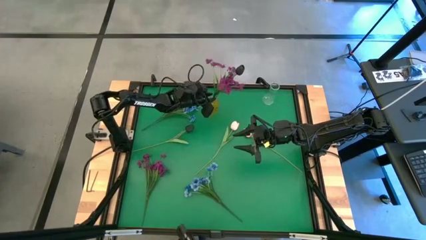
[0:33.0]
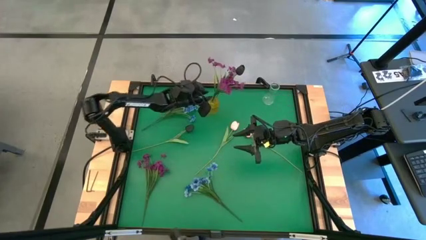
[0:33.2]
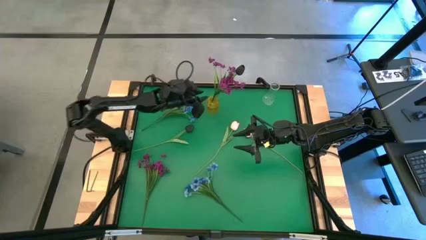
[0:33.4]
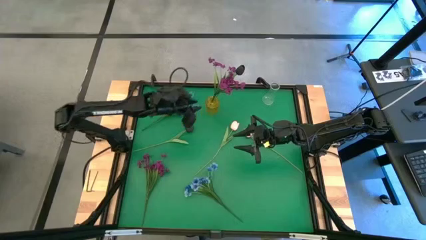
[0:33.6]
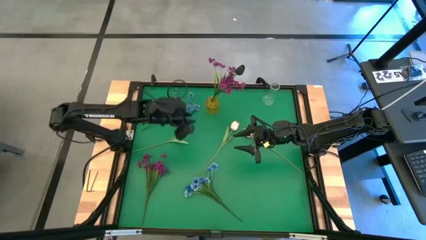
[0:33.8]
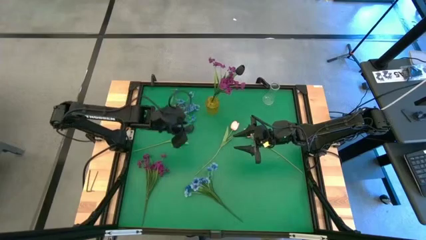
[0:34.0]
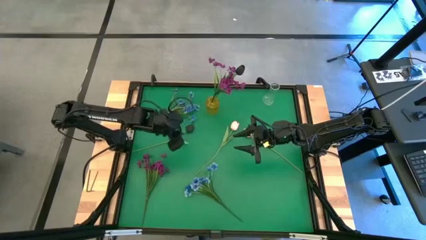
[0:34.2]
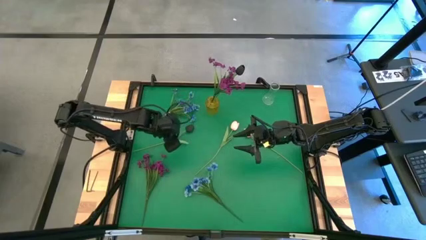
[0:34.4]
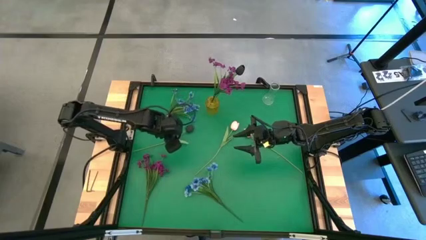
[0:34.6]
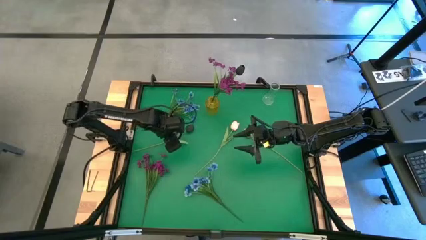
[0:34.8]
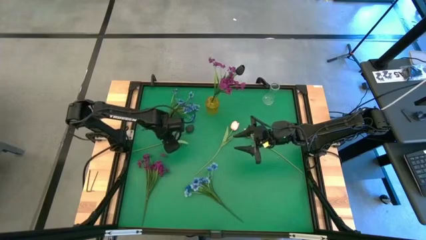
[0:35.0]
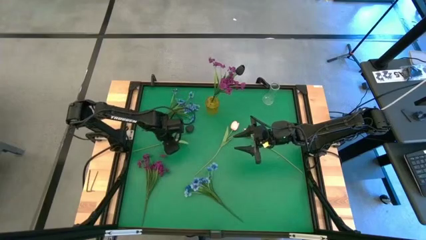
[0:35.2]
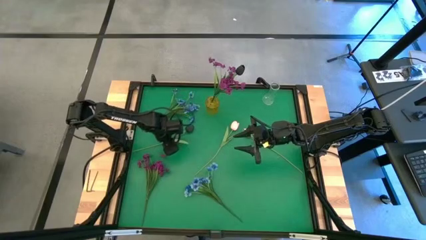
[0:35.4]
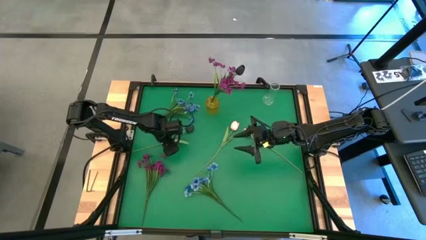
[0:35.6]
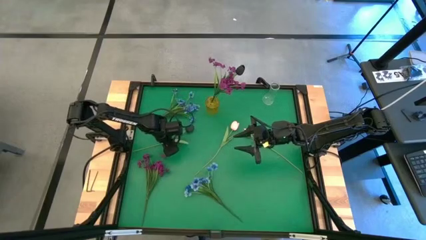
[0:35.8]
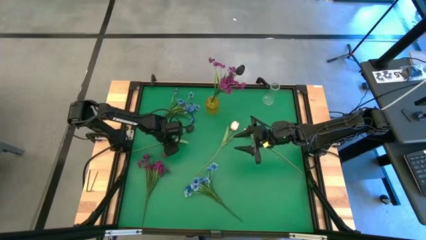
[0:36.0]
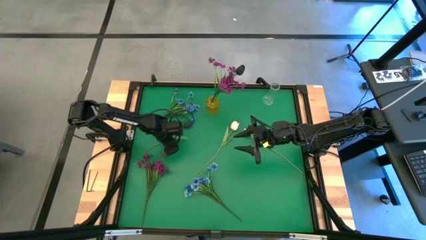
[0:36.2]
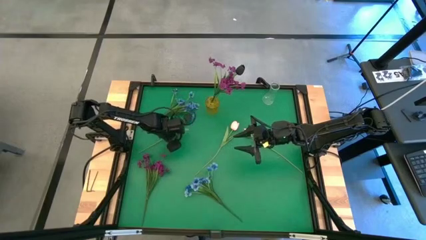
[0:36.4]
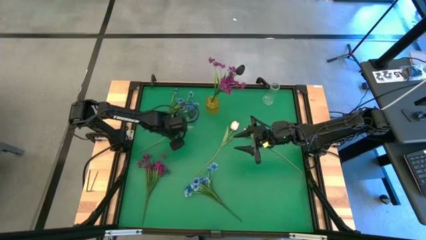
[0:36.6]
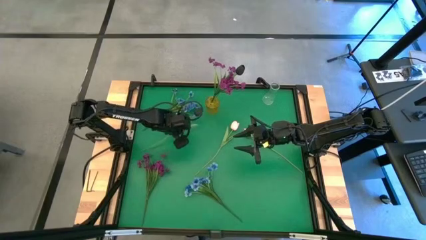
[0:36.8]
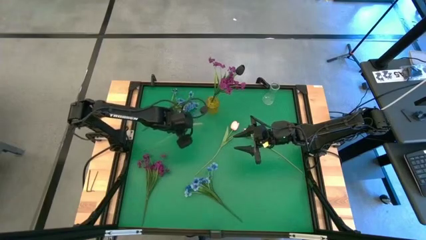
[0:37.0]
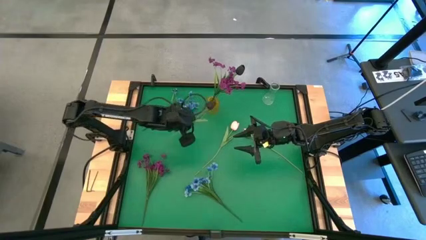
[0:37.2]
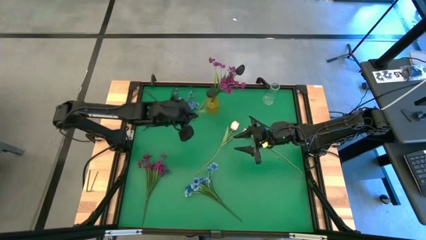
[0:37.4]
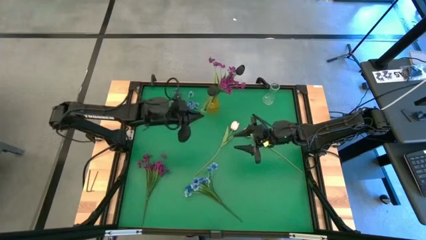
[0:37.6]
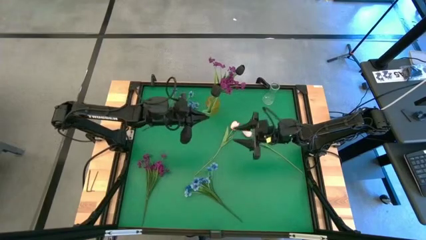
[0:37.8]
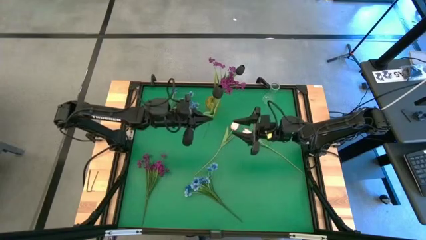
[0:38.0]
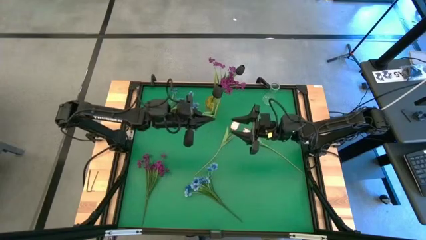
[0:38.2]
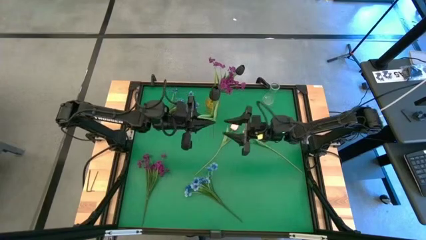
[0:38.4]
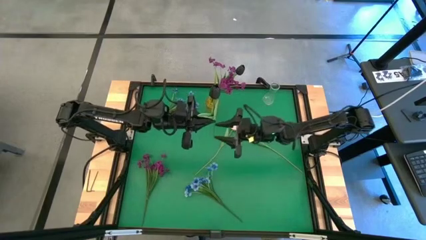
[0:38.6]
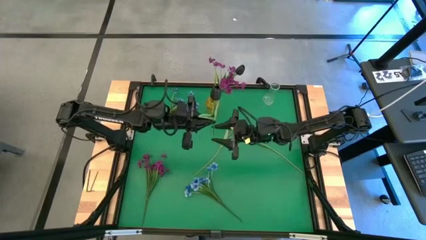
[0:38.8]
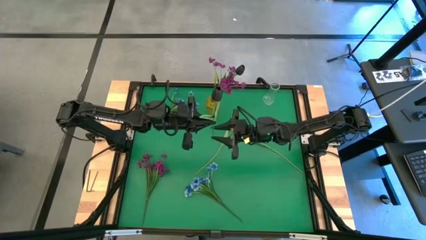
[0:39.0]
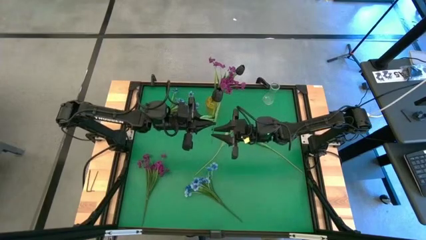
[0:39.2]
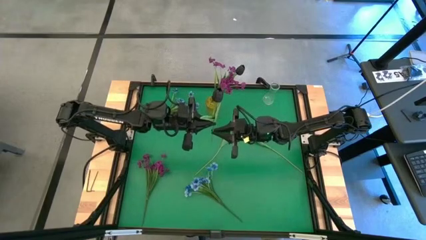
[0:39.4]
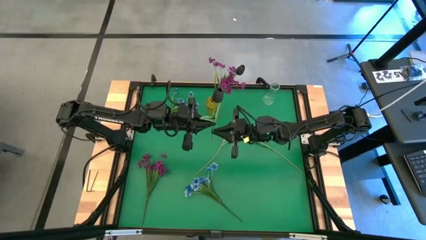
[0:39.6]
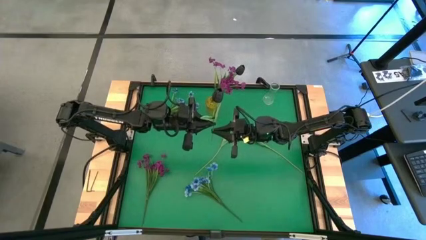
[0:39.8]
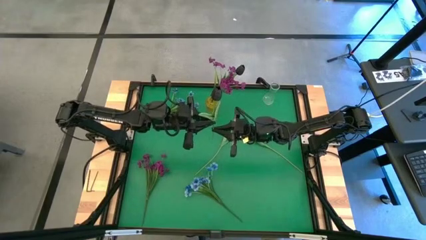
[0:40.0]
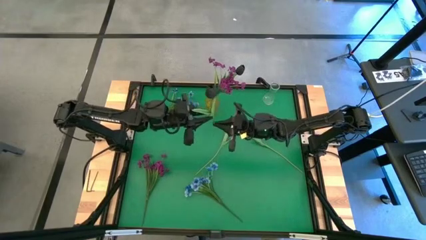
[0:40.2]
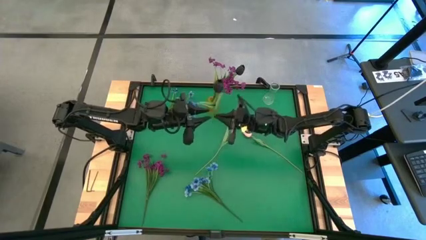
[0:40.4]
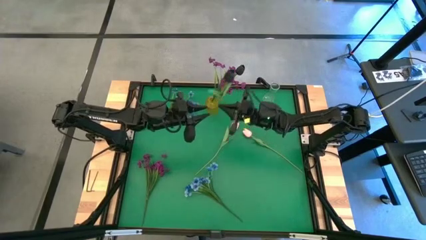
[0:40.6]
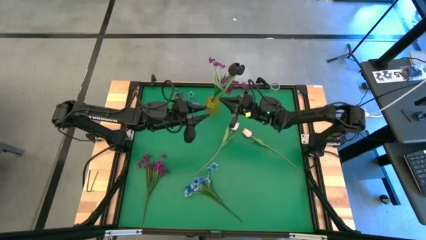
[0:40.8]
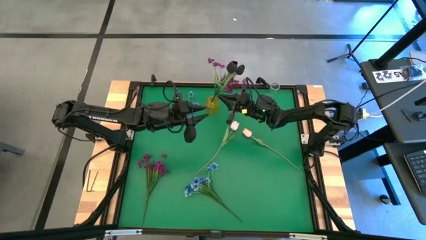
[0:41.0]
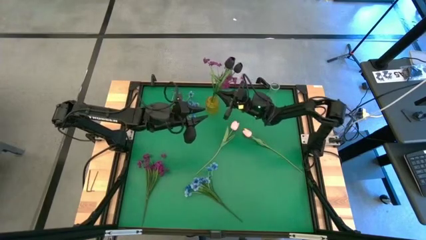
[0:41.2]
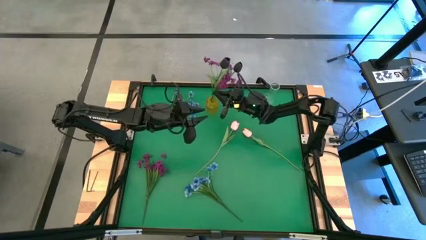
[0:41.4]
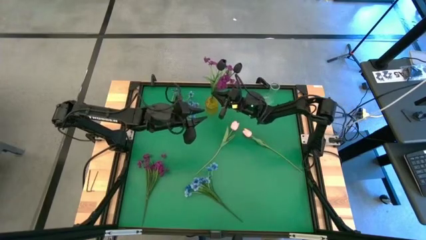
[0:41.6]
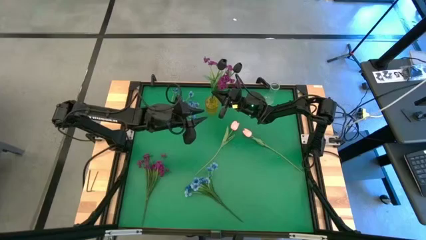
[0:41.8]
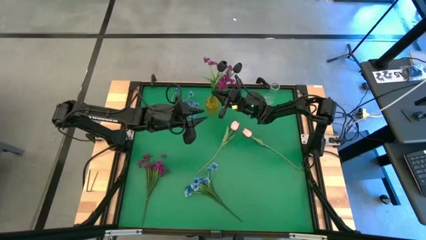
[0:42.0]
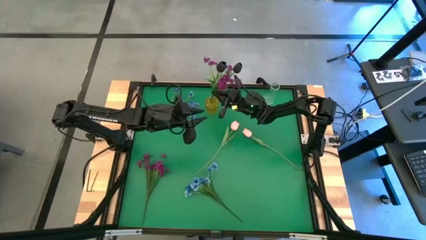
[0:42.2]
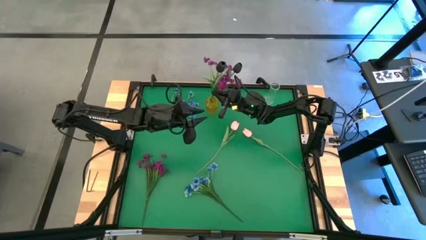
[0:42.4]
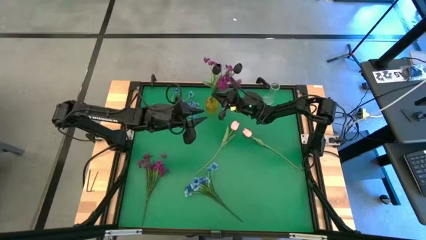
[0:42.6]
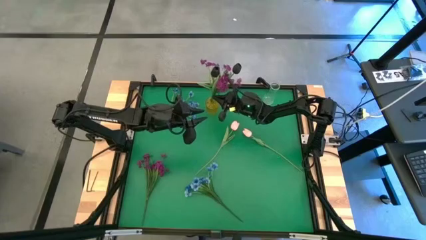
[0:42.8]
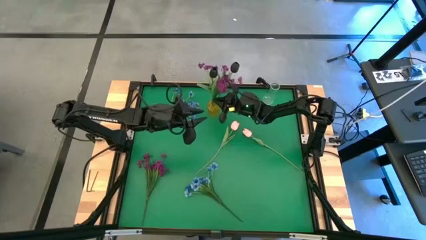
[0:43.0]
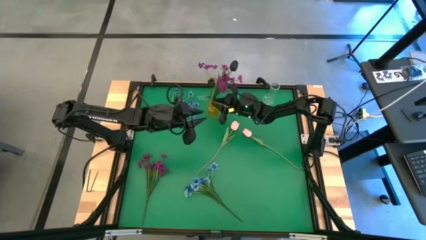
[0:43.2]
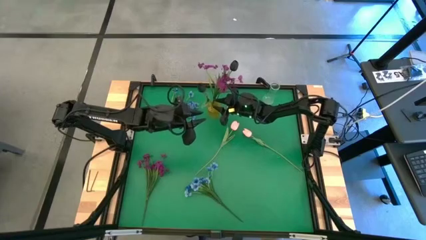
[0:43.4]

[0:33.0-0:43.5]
Task: Sort flowers into vase by color
Put the black flower into the yellow vase

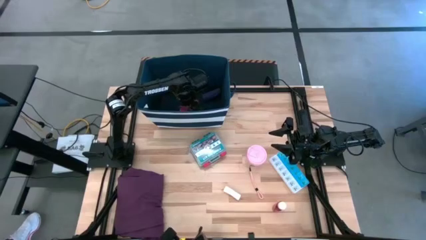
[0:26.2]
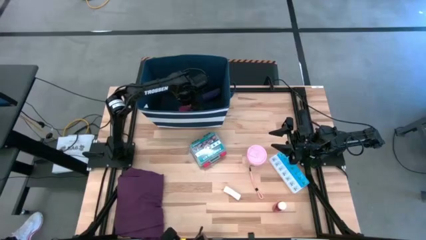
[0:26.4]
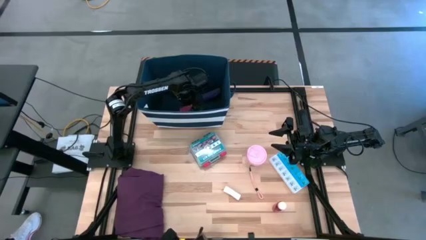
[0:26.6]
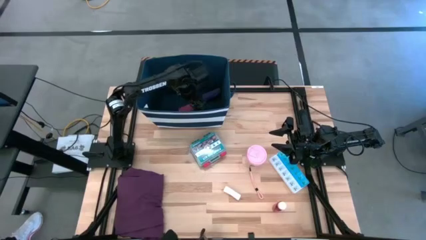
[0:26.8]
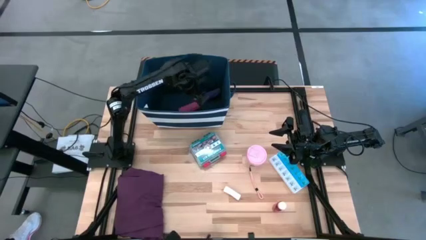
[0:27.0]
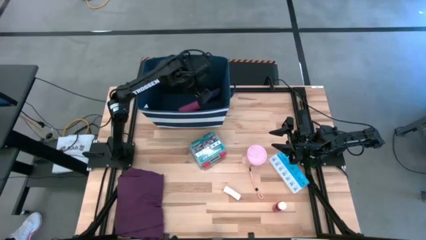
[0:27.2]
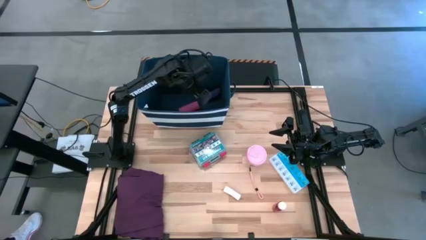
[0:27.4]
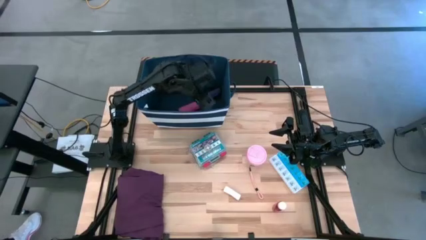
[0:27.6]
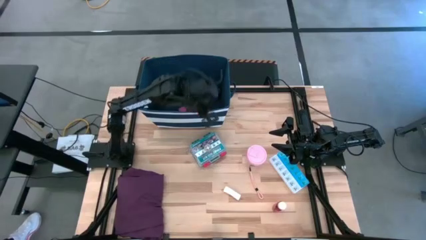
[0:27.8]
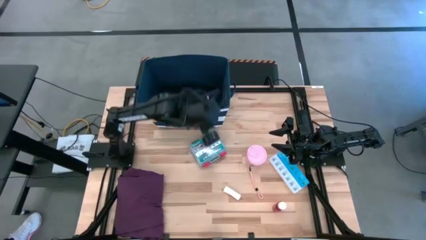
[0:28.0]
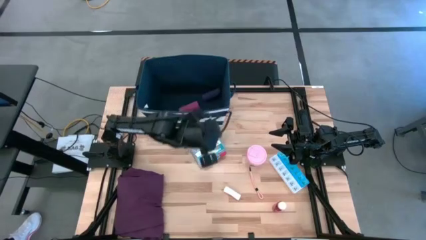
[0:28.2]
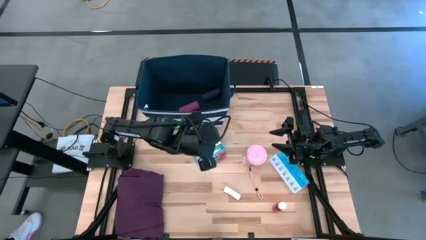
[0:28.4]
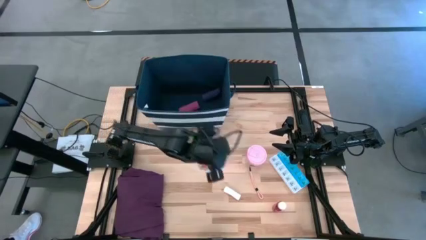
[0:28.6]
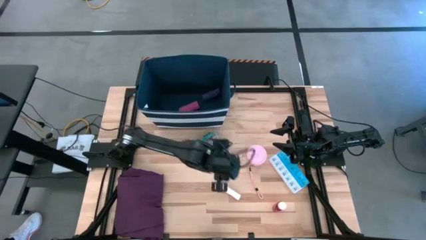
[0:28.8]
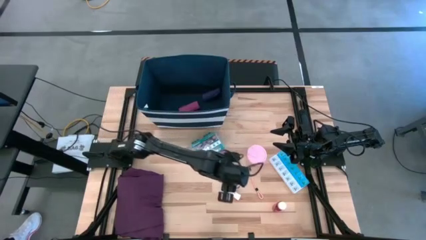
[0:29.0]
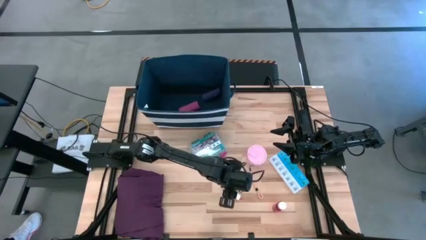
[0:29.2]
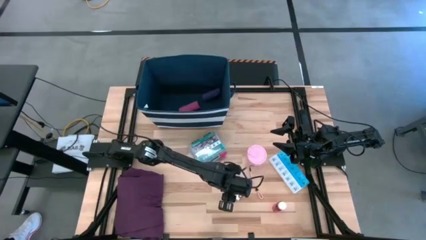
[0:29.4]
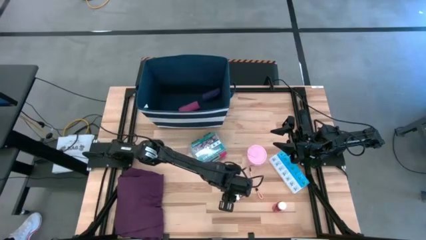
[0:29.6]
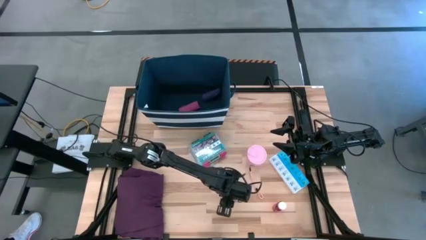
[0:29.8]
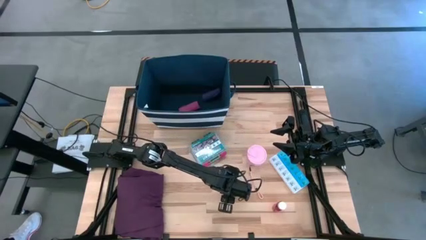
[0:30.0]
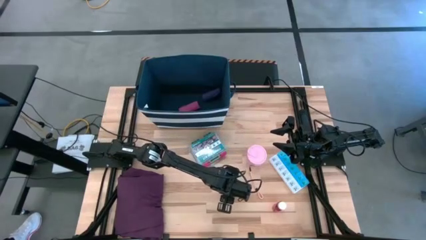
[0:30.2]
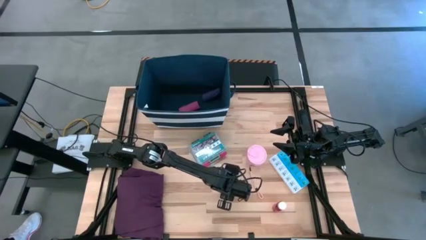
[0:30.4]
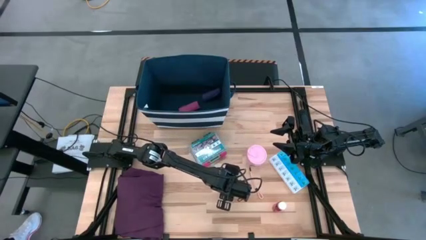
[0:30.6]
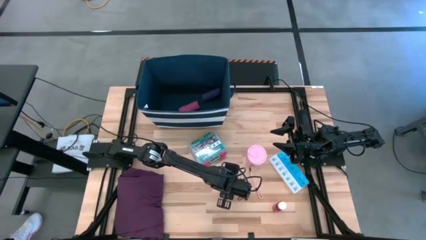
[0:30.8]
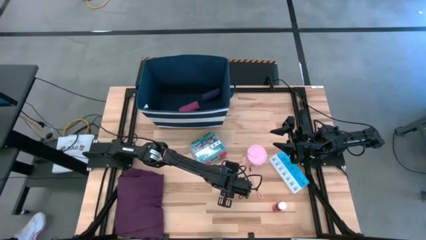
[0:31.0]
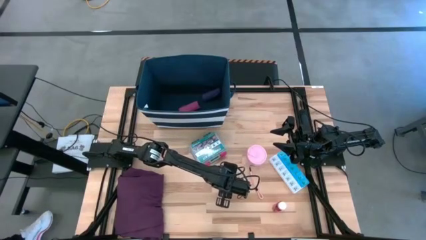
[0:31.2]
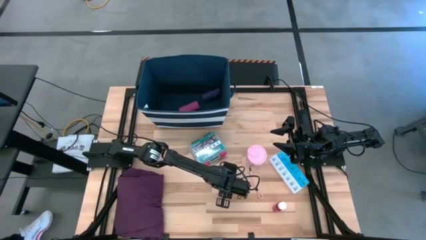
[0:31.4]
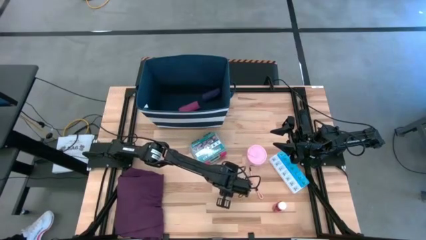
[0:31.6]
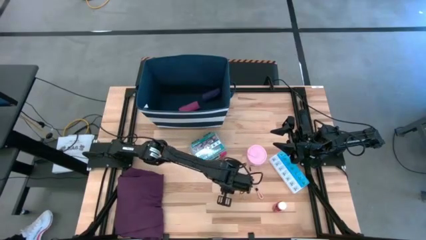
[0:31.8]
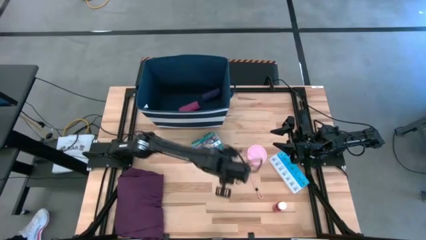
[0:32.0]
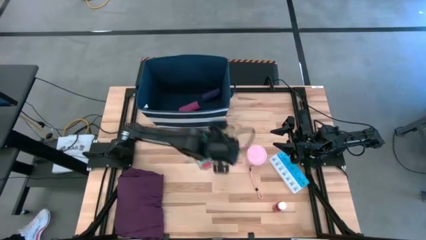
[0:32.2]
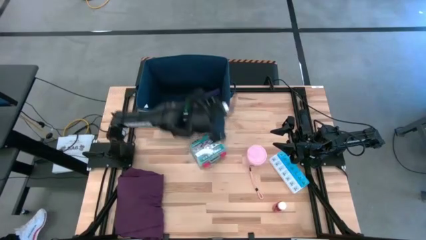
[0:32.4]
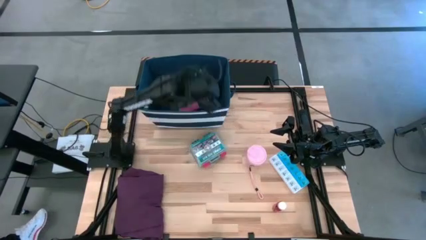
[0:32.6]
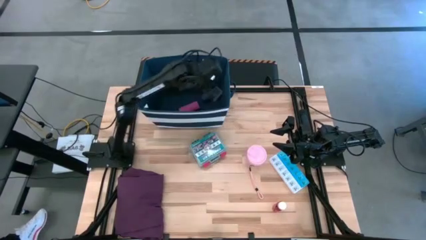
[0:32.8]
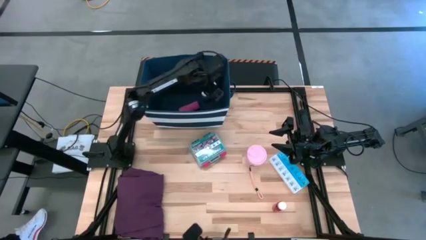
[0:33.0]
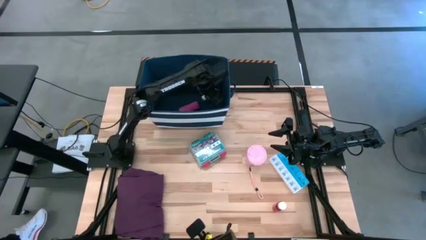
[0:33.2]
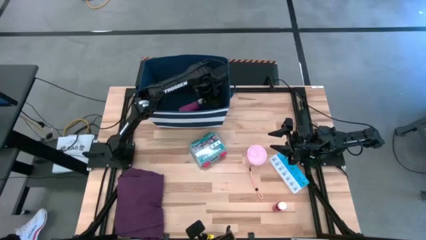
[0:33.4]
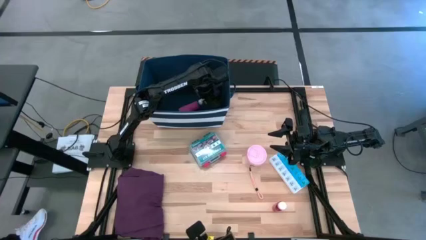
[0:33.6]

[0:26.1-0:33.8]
Task: Pick & place medical supplies in basket/bin
Put the white rolled gauze into the blue bin
